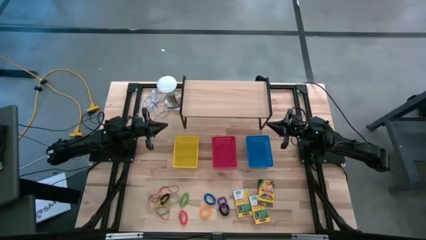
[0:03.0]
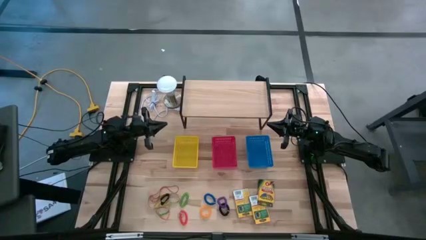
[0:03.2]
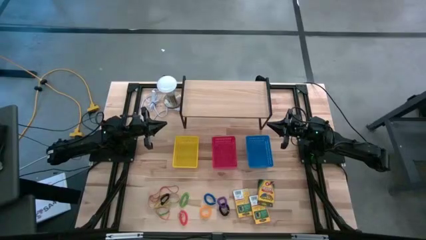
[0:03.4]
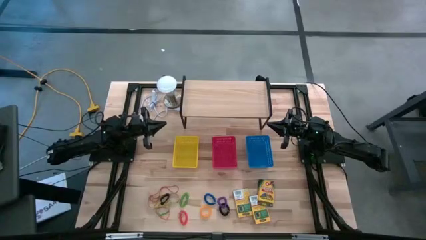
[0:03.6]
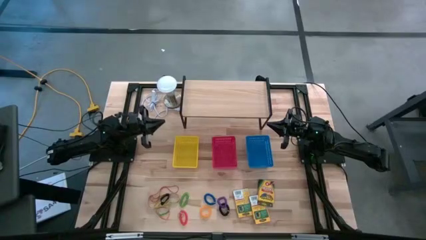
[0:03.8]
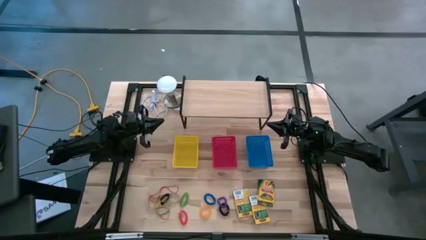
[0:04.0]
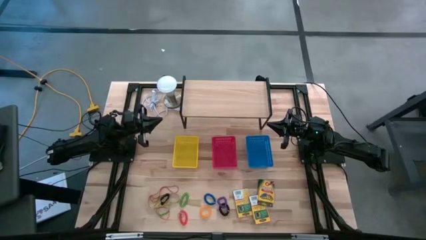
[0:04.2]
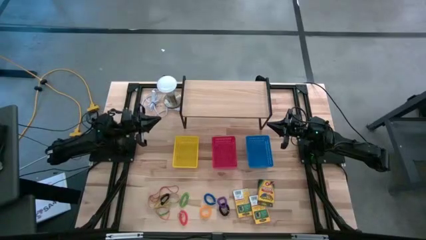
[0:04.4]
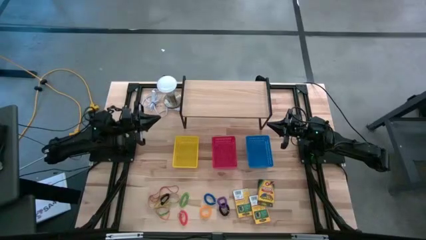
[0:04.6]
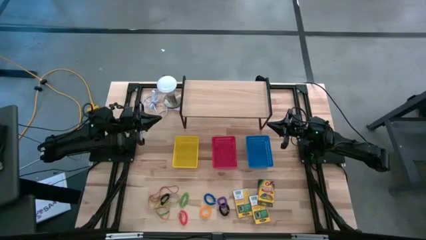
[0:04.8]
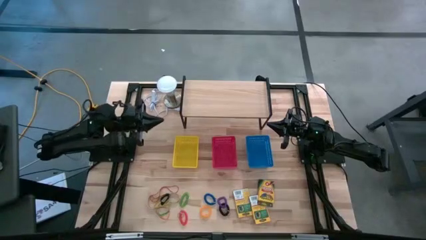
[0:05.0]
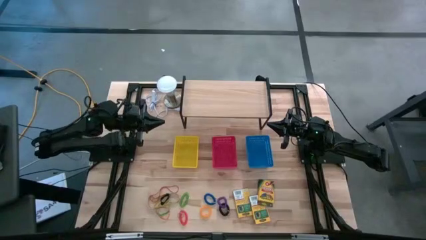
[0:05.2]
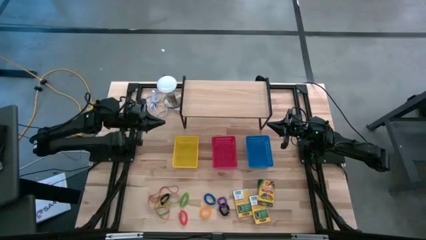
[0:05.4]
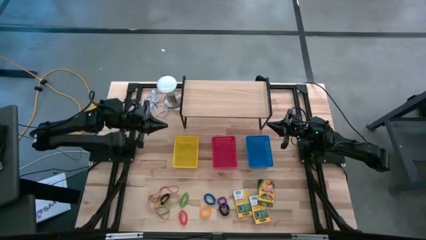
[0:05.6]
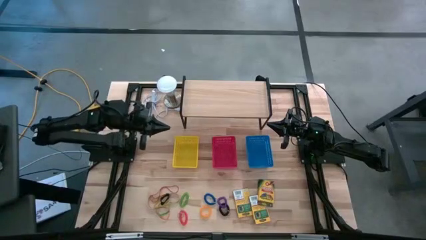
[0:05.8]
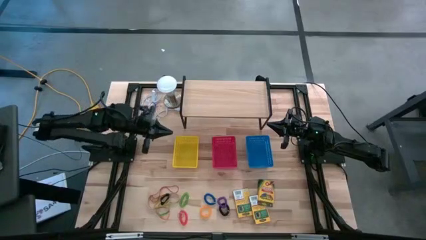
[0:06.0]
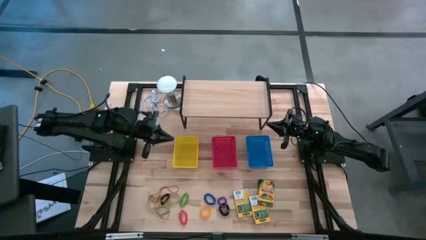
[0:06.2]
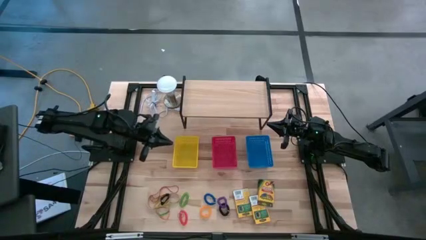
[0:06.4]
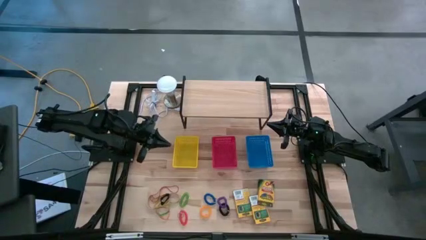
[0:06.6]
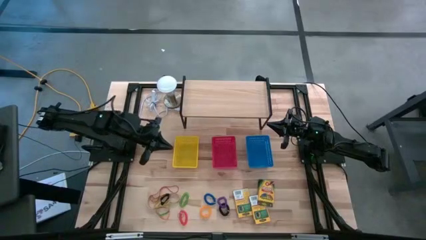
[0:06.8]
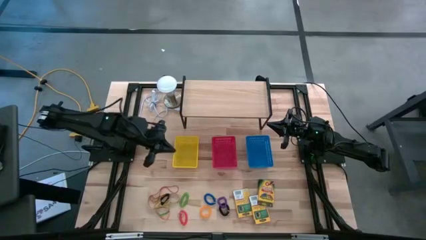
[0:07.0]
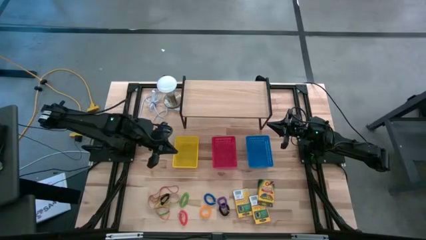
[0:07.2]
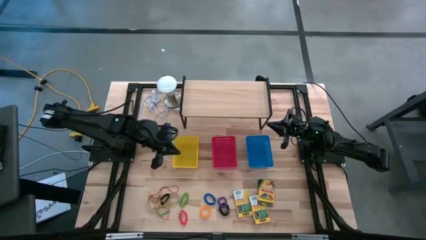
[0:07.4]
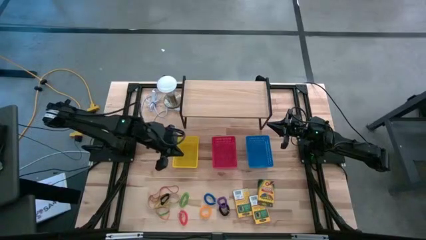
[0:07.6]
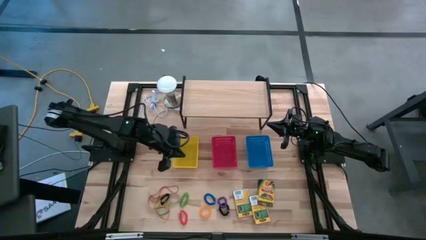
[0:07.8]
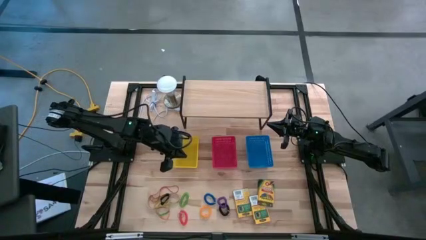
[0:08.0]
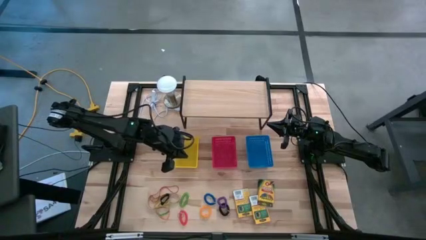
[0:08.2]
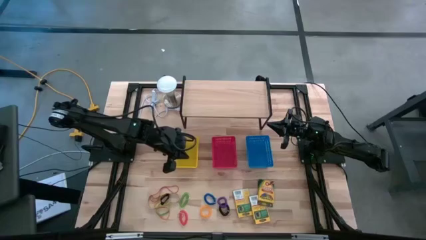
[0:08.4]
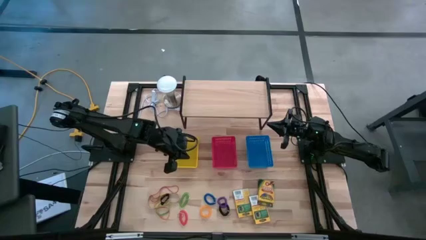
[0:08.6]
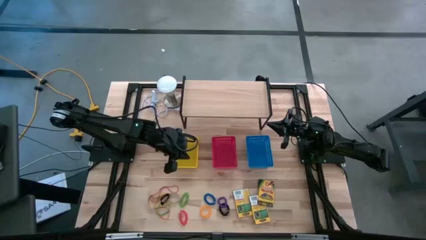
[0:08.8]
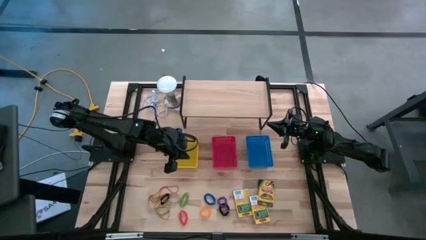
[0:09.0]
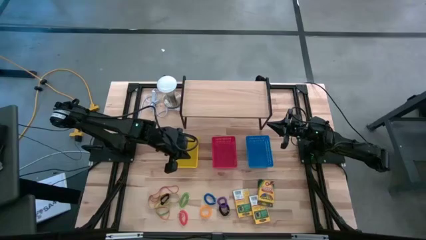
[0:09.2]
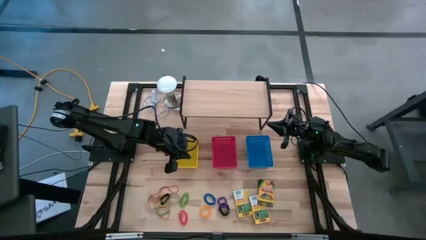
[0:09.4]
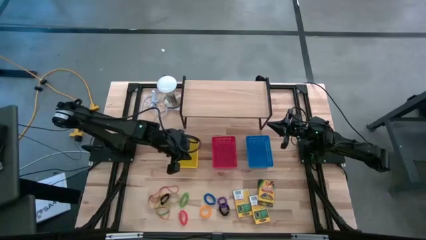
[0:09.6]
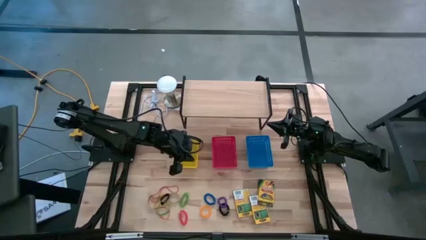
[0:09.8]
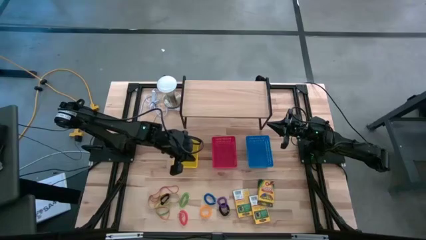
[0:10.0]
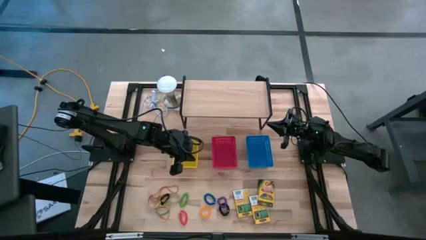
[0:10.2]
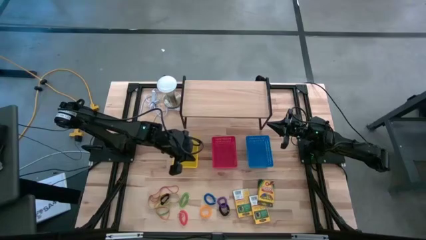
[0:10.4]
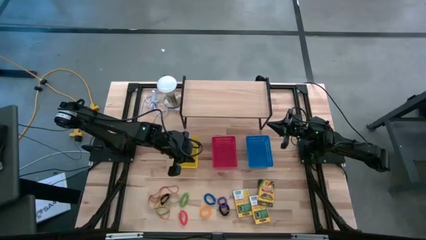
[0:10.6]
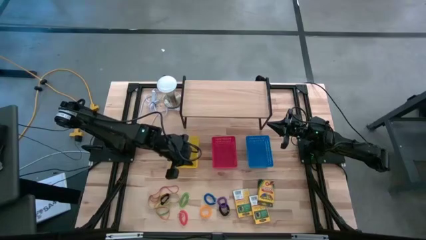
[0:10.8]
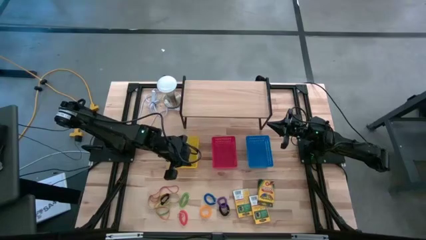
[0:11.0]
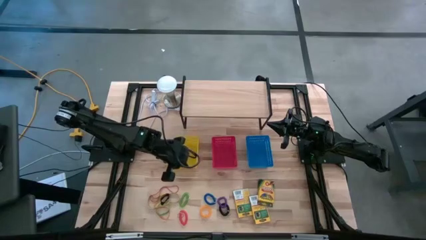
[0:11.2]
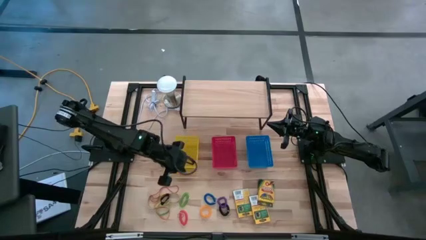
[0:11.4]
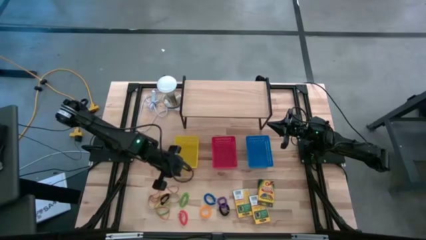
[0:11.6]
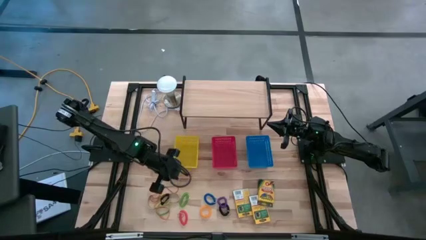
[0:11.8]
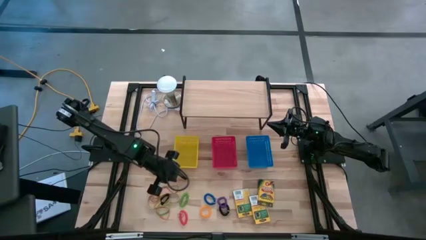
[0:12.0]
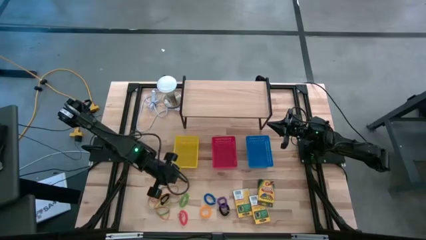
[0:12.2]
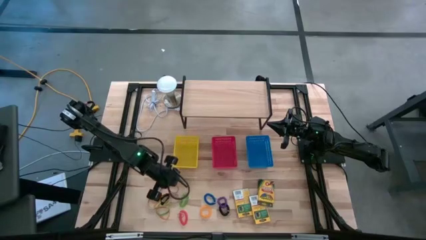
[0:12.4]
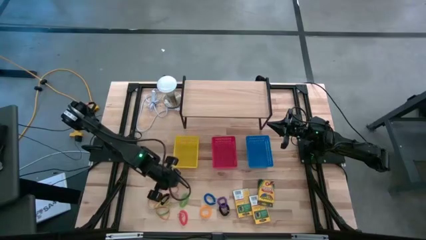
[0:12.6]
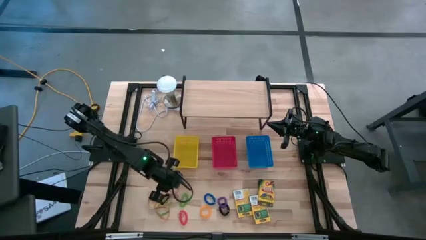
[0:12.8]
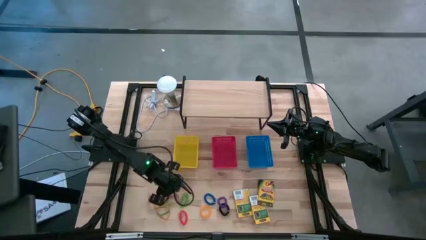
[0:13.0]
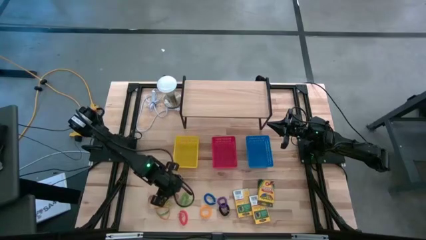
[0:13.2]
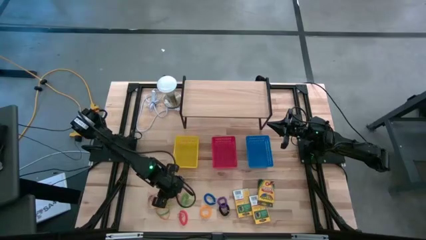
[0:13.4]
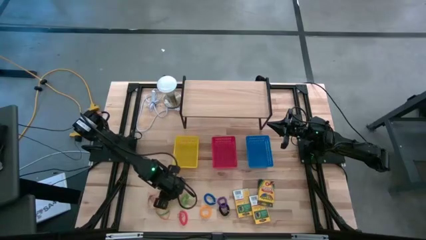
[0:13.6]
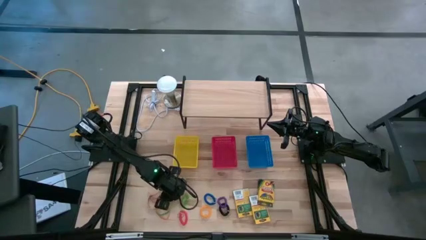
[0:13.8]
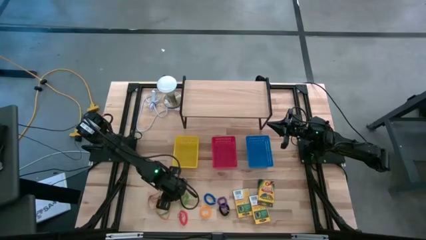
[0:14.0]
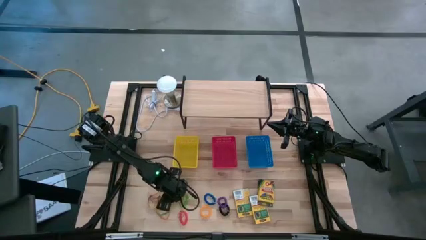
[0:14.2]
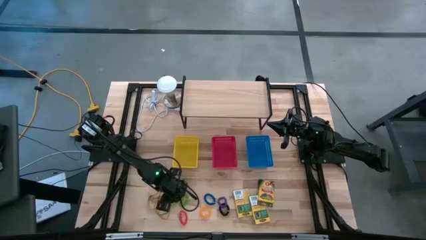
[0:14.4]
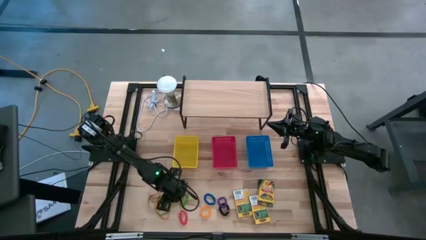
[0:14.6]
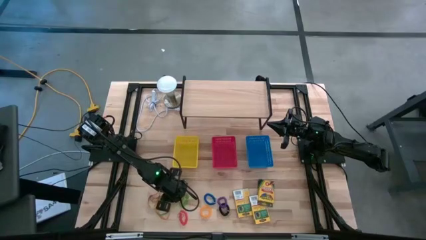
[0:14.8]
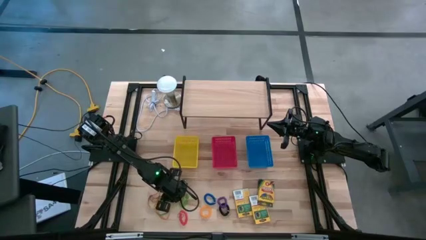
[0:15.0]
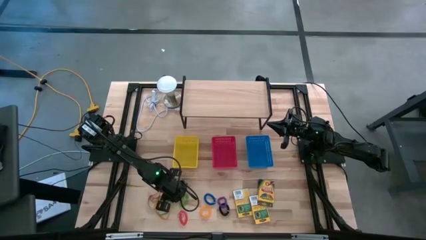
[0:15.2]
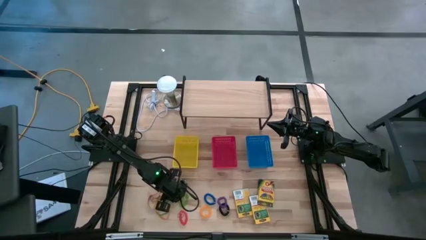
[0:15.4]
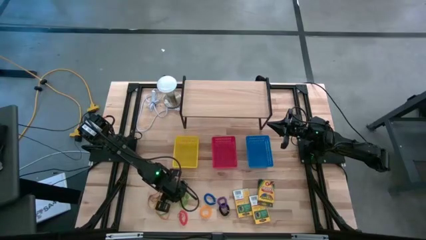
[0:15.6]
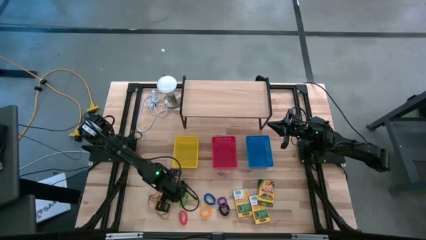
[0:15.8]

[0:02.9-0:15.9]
Task: Pick & Place Office Desk Supplies
Put the white rubber band into the yellow bin
